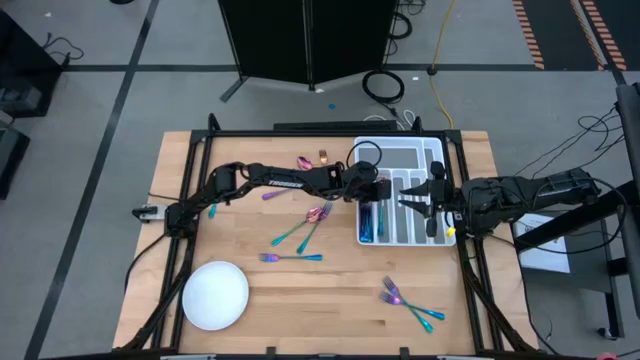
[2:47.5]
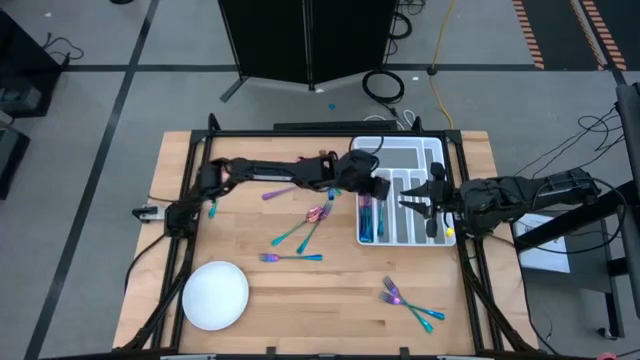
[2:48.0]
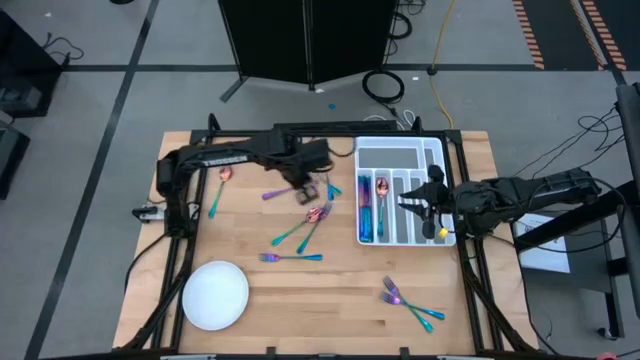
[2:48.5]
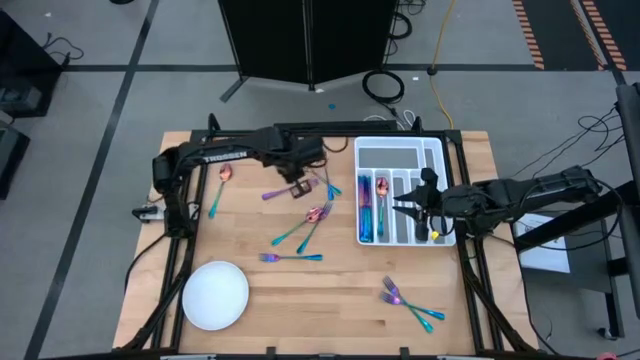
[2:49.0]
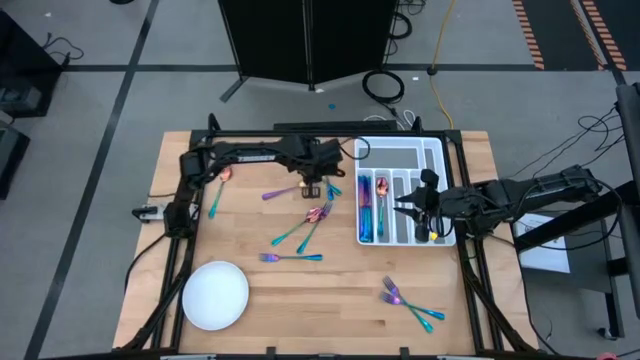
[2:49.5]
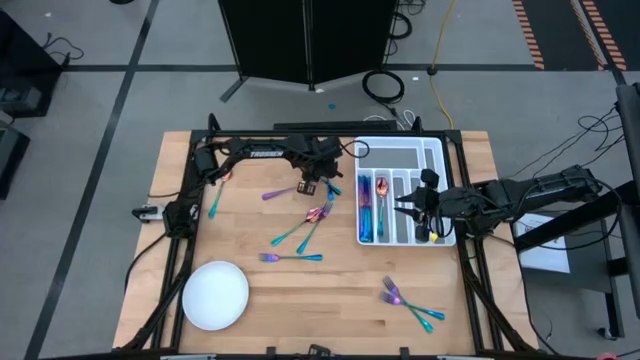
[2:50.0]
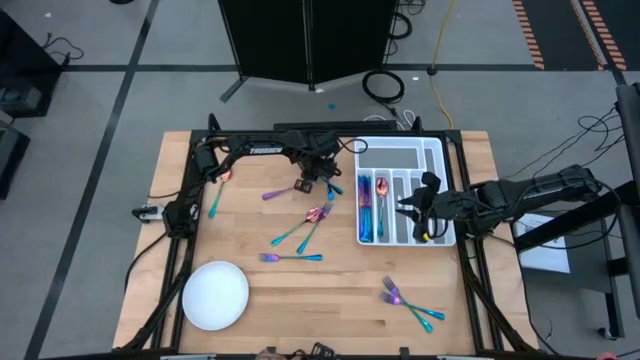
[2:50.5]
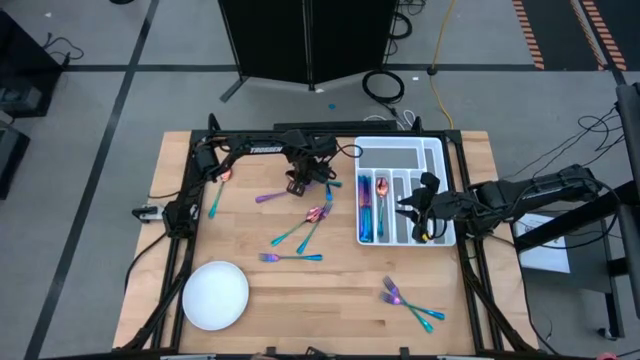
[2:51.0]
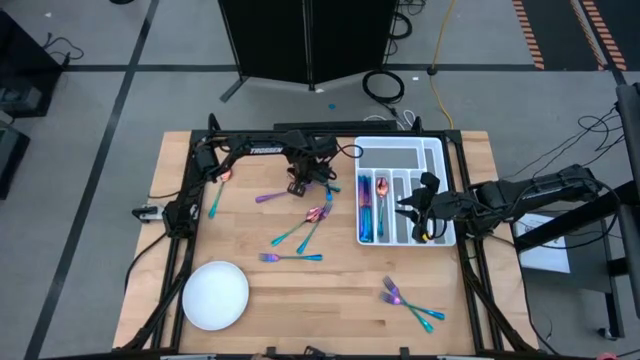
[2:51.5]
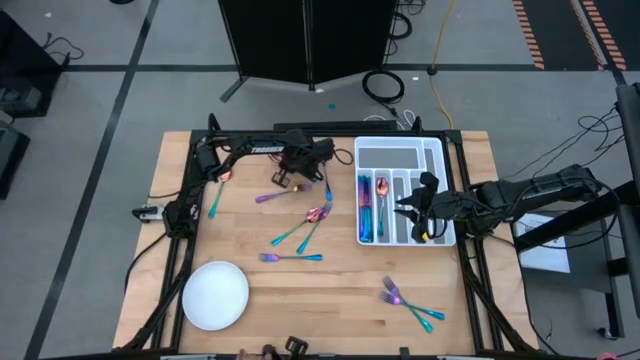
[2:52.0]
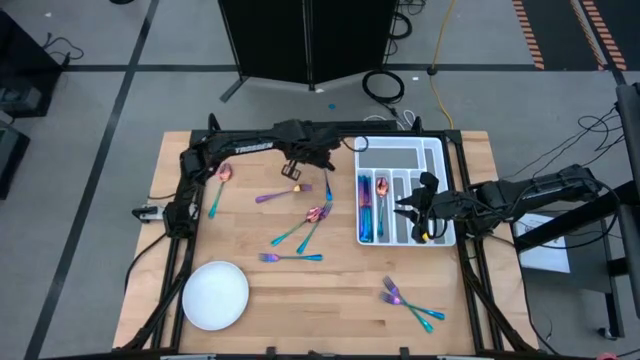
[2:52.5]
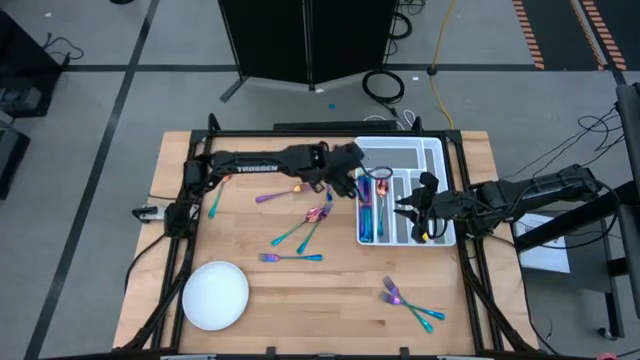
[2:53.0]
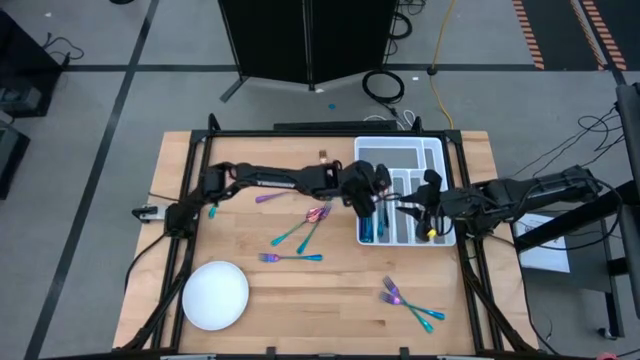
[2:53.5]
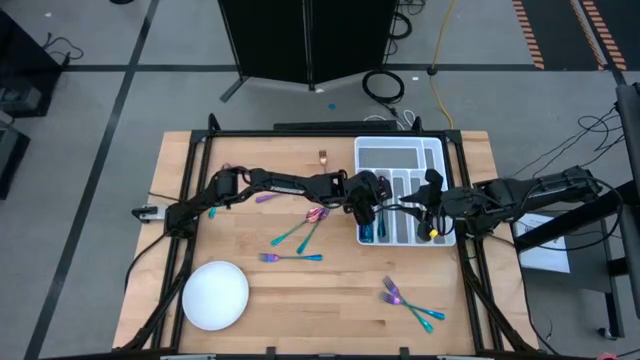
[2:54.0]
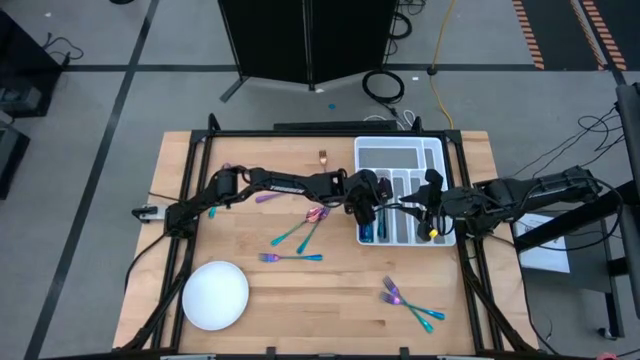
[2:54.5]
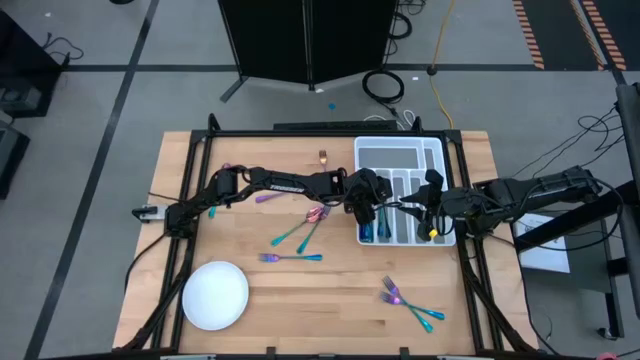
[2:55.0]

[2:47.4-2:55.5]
Task: Sort silverware
Put the blue spoon into the utensil organizer

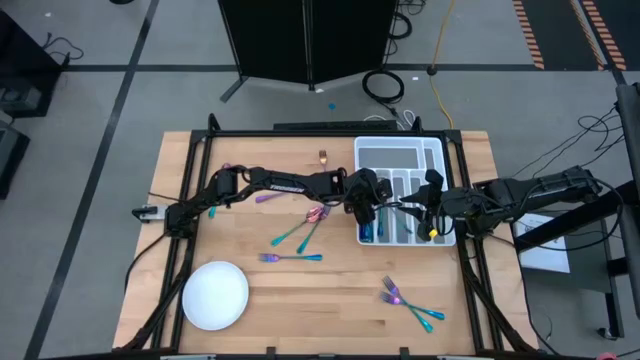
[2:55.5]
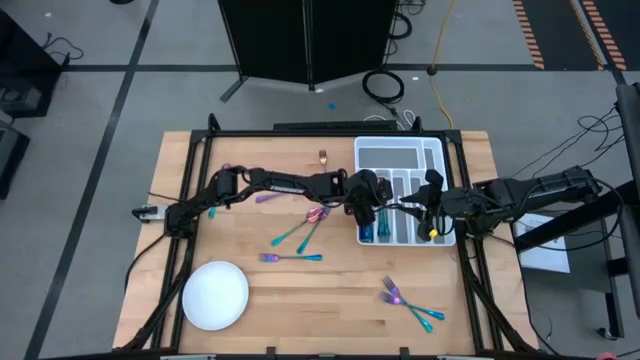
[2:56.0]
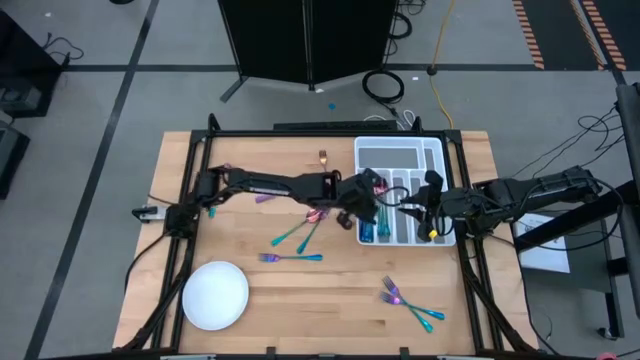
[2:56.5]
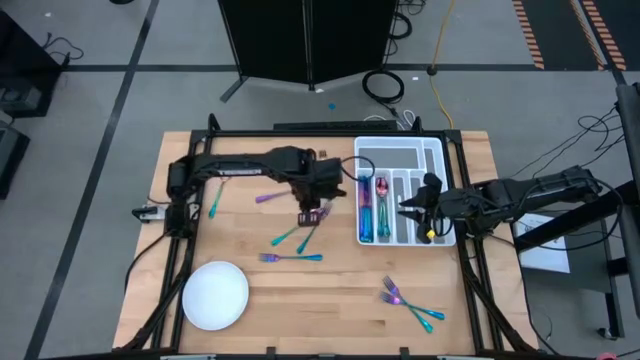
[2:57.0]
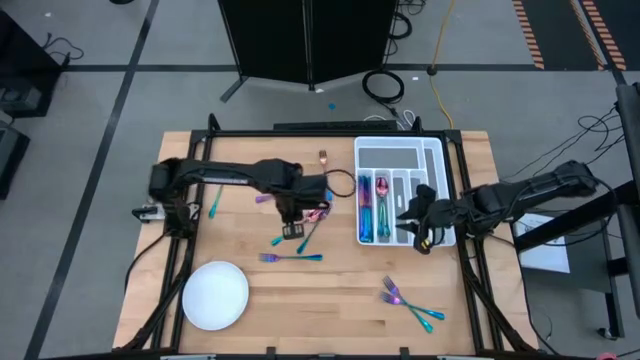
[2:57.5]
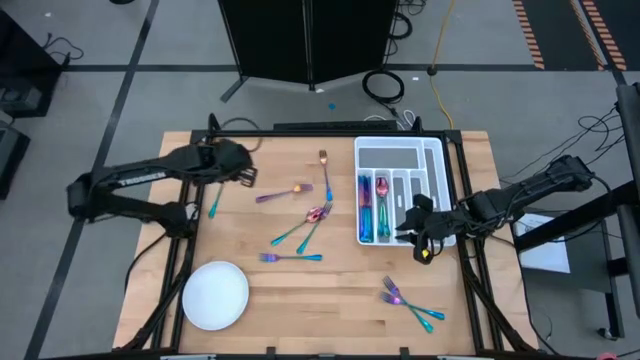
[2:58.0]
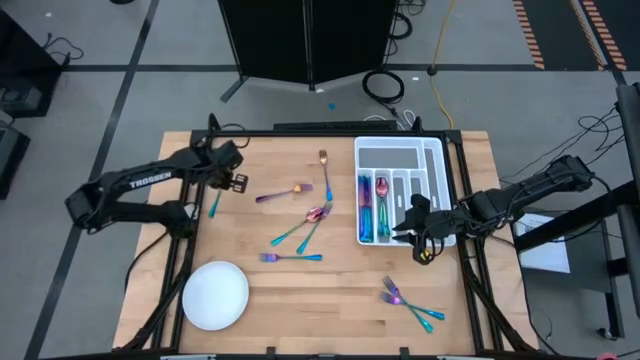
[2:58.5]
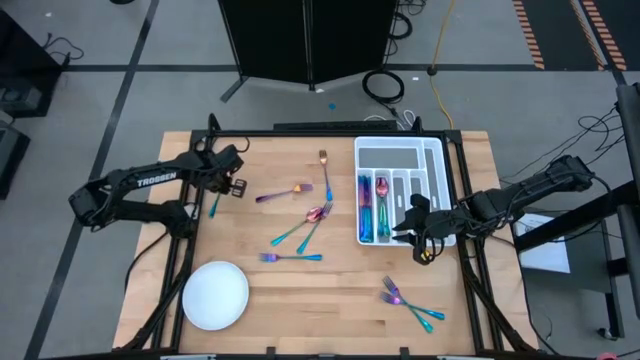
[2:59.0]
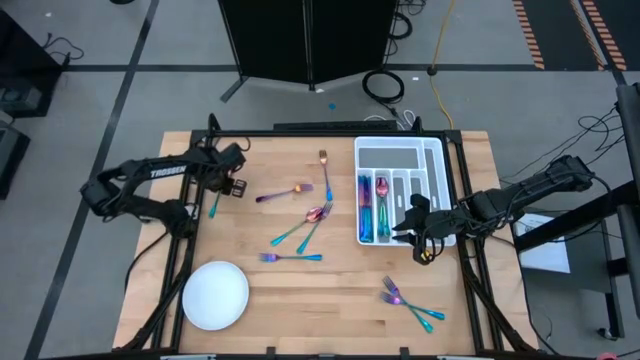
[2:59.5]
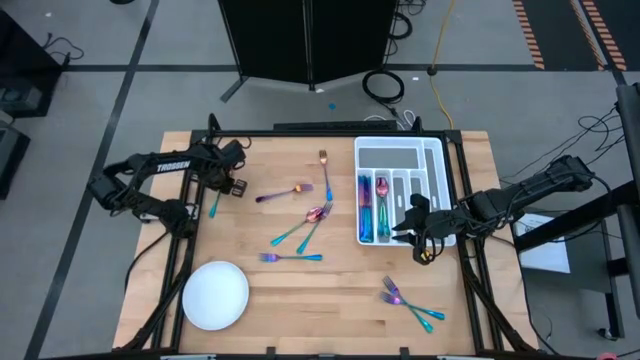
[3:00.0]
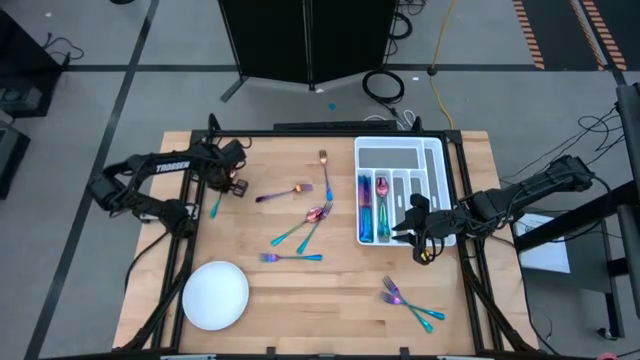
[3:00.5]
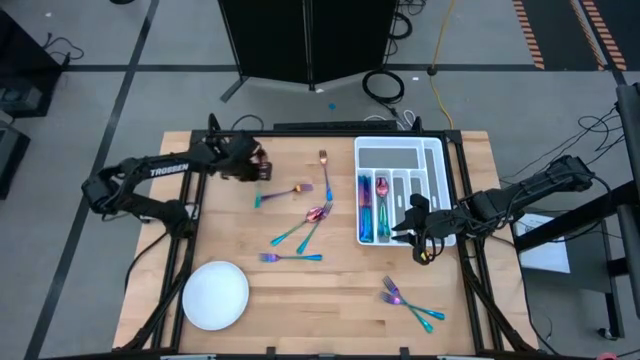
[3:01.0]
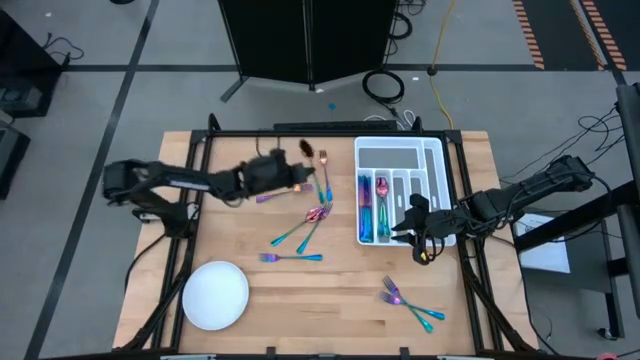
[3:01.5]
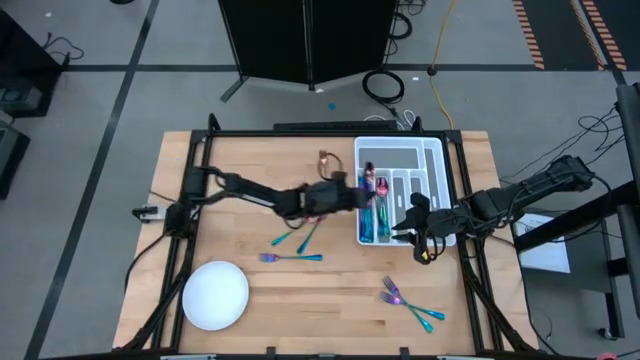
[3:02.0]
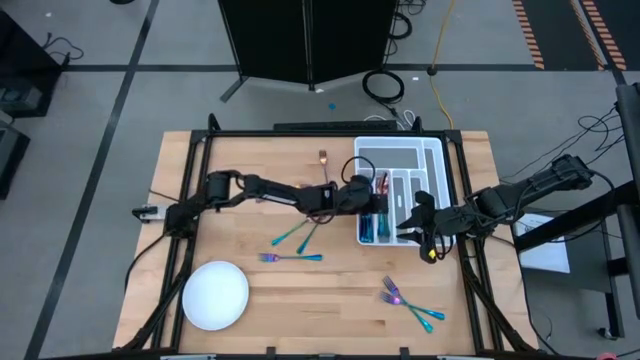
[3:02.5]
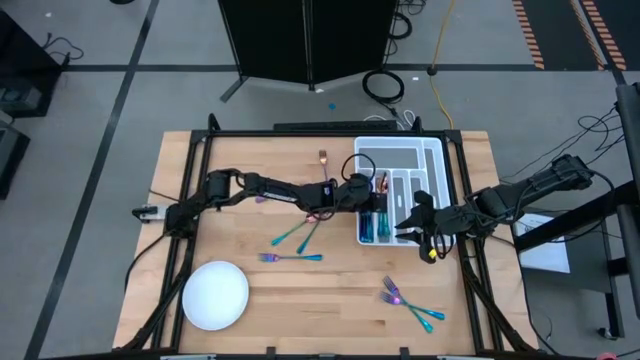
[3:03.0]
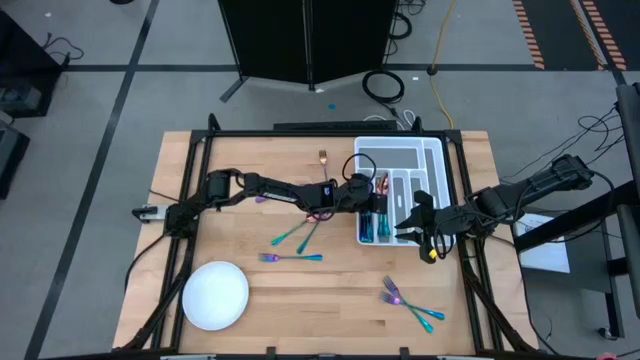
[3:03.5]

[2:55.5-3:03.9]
Put the blue spoon into the utensil organizer

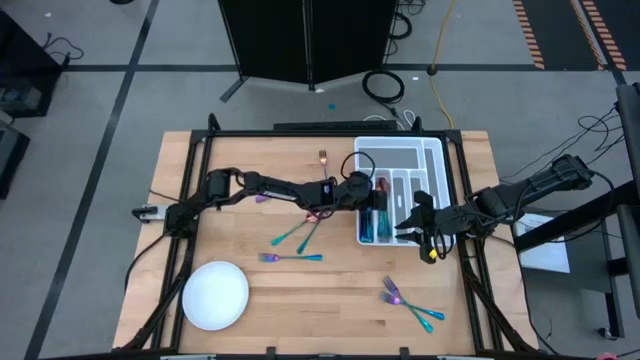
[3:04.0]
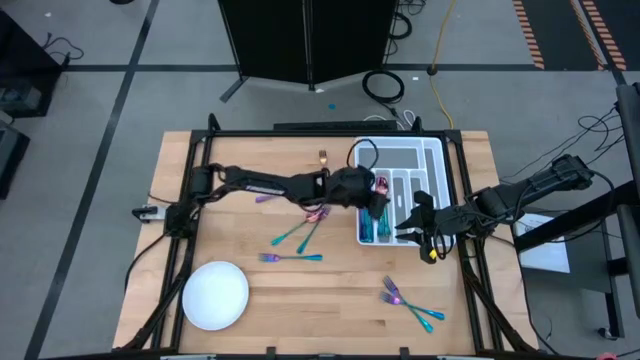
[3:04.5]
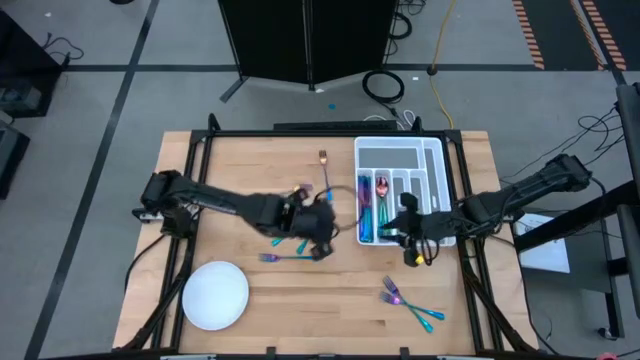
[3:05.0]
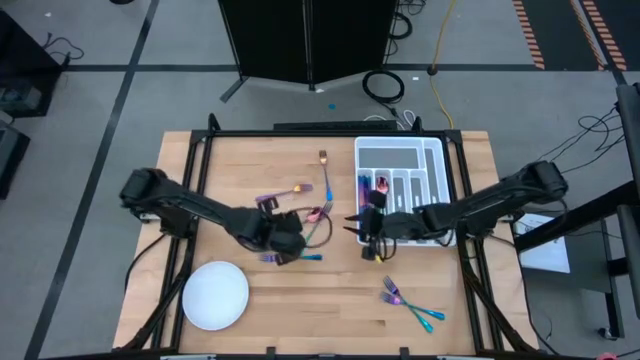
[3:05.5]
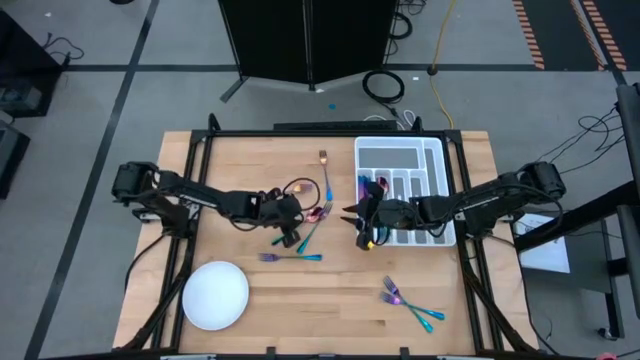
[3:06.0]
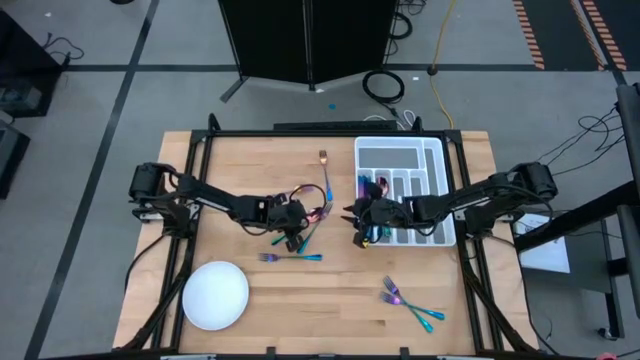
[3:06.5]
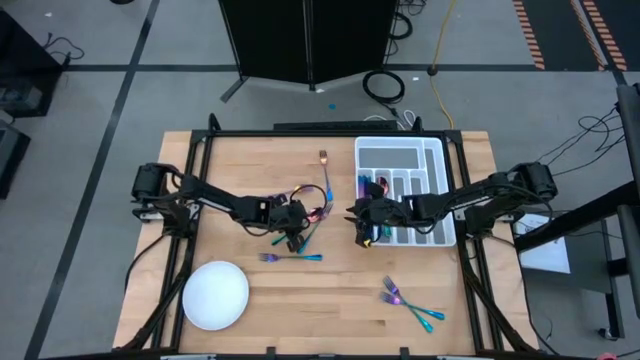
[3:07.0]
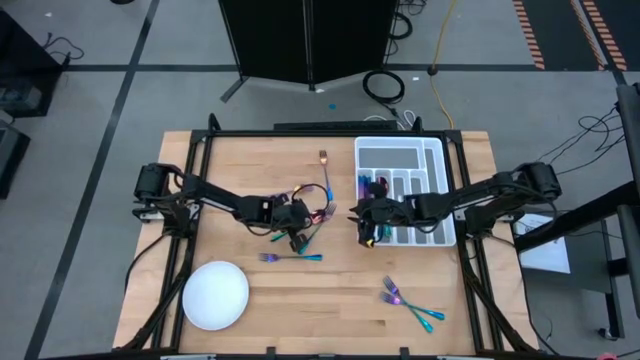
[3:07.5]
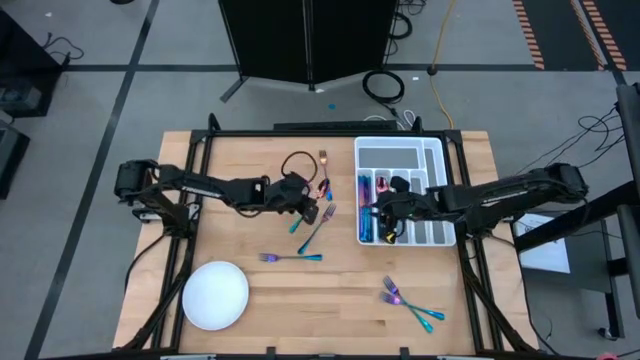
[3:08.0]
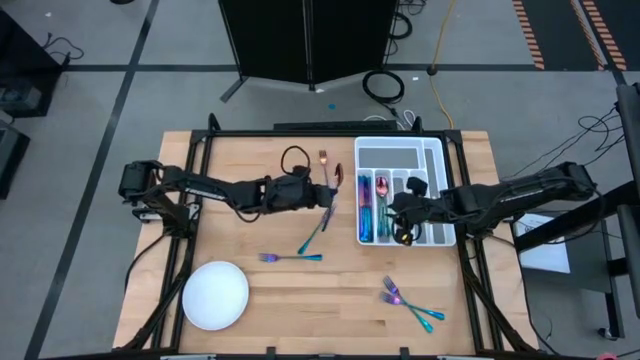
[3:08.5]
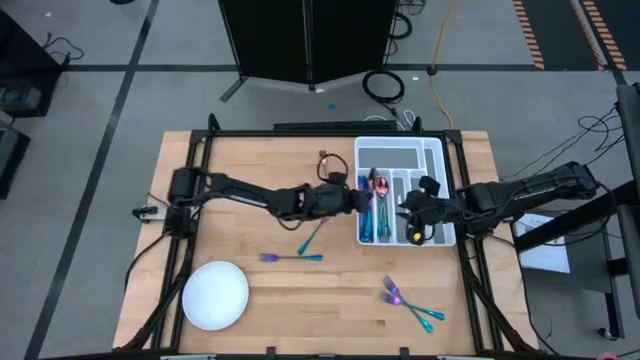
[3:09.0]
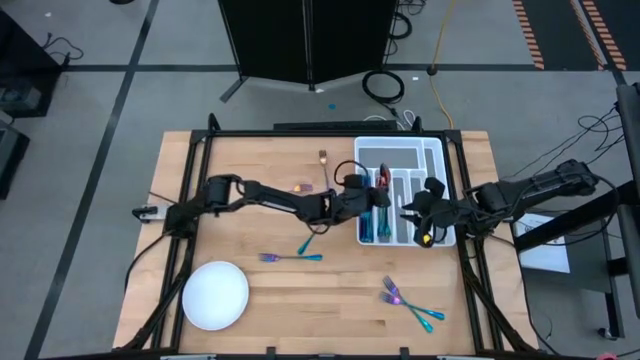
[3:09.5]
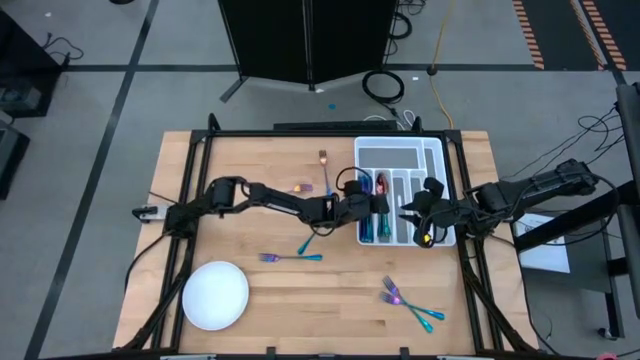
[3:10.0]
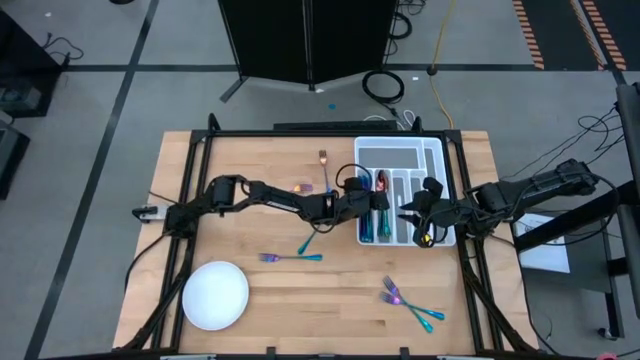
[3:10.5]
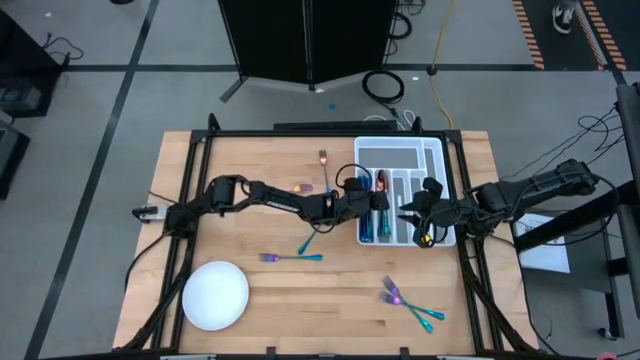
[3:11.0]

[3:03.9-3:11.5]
Put the blue spoon into the utensil organizer
